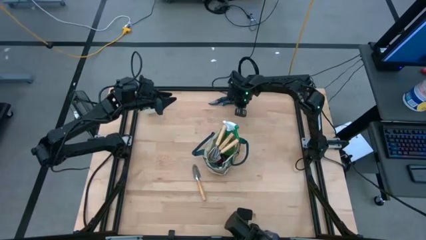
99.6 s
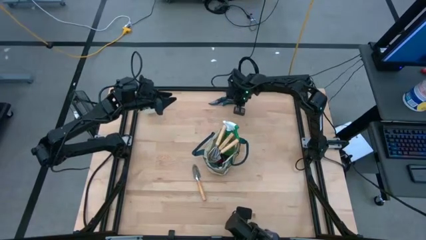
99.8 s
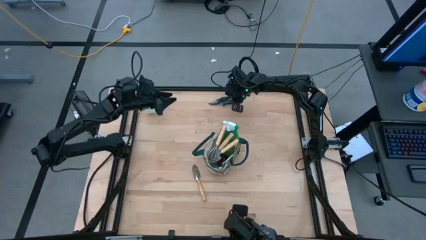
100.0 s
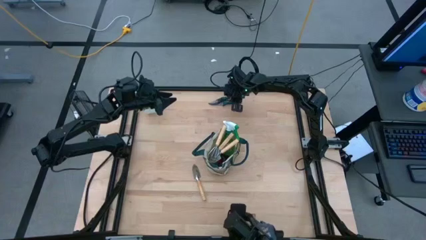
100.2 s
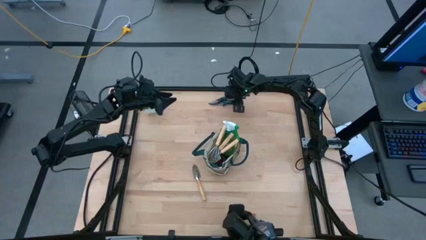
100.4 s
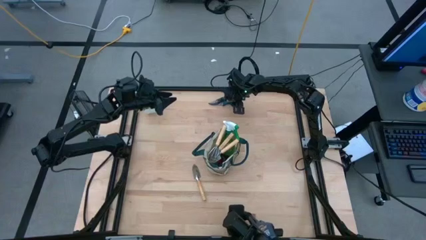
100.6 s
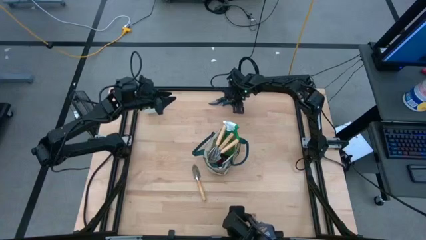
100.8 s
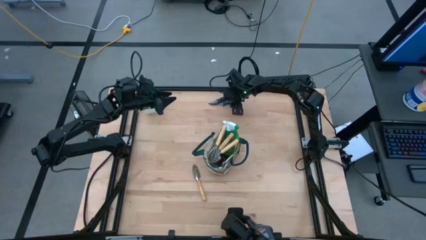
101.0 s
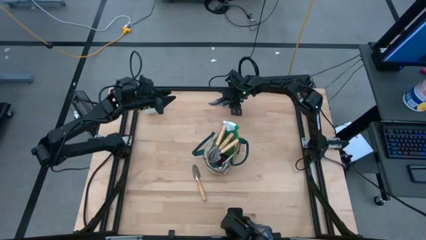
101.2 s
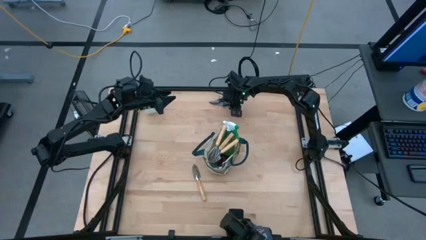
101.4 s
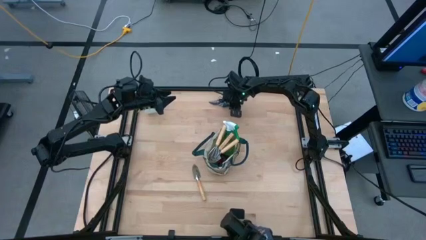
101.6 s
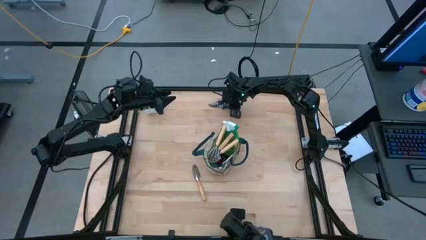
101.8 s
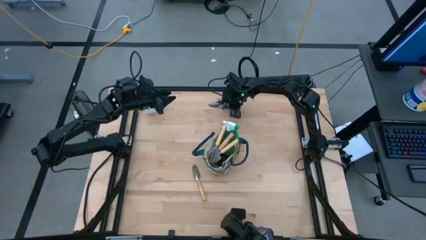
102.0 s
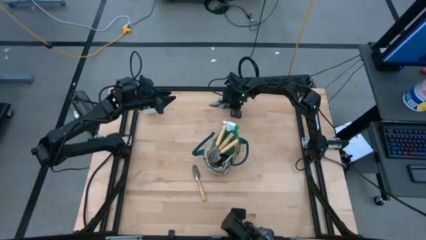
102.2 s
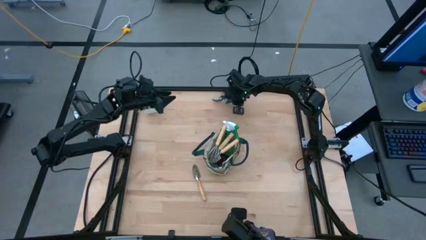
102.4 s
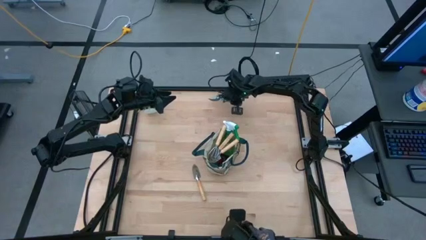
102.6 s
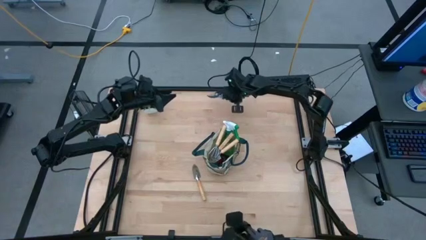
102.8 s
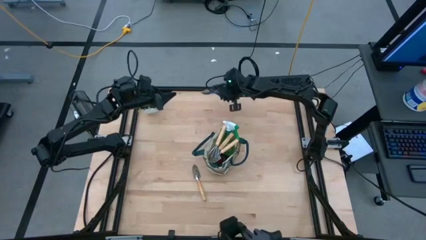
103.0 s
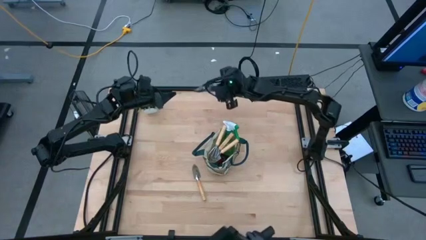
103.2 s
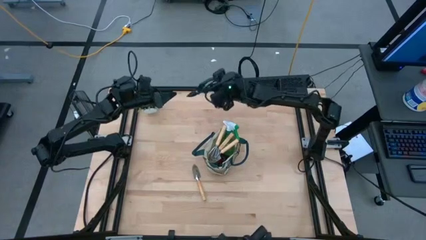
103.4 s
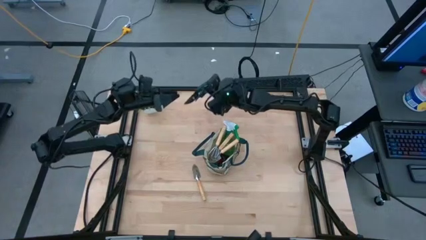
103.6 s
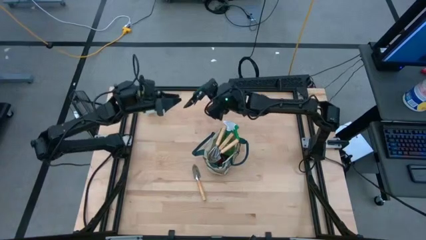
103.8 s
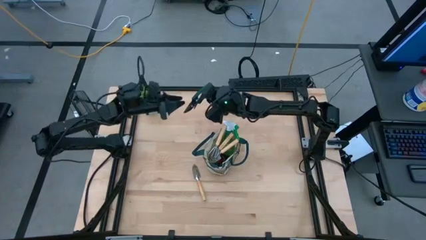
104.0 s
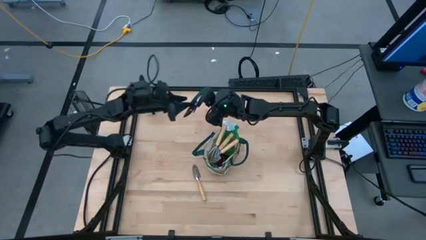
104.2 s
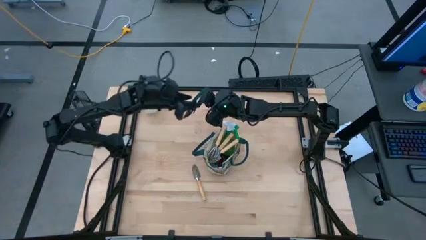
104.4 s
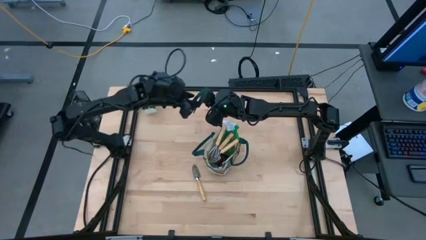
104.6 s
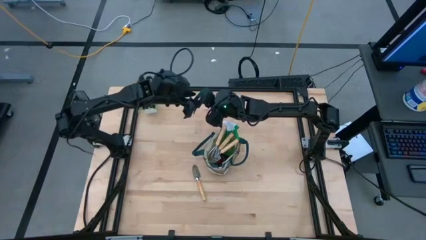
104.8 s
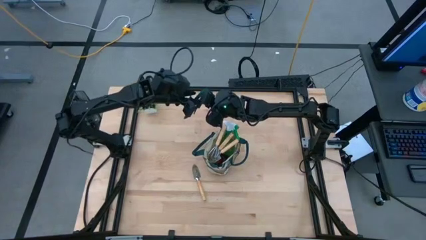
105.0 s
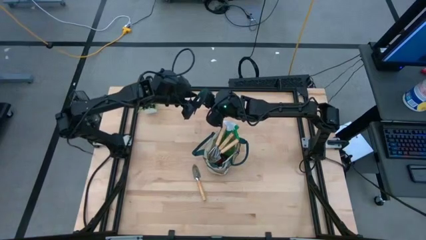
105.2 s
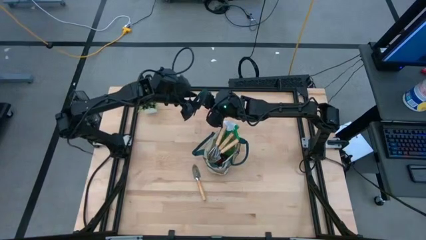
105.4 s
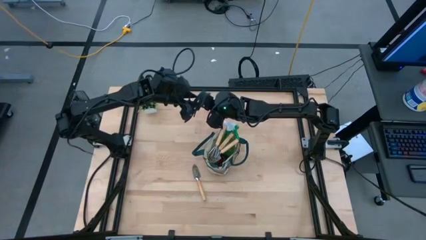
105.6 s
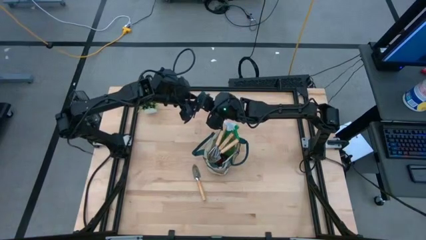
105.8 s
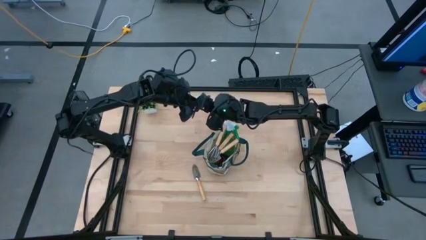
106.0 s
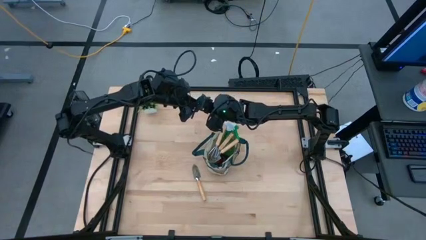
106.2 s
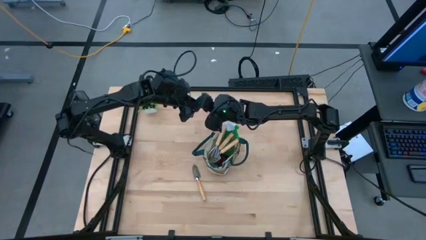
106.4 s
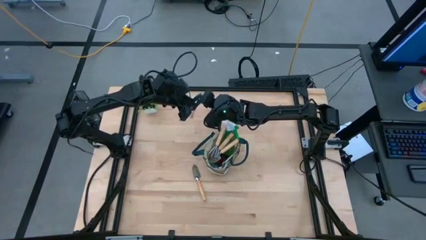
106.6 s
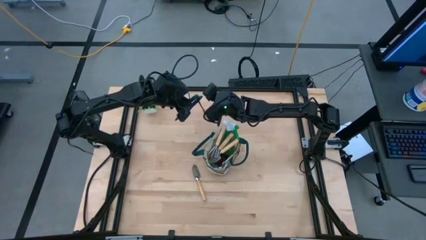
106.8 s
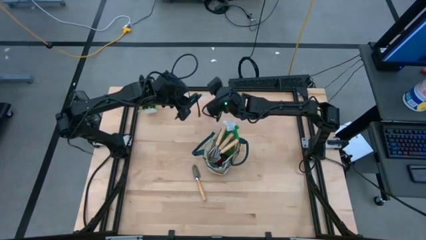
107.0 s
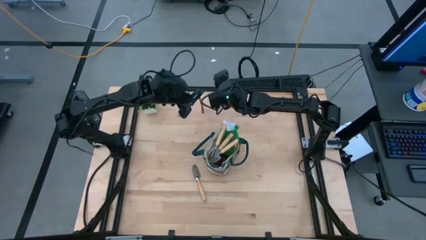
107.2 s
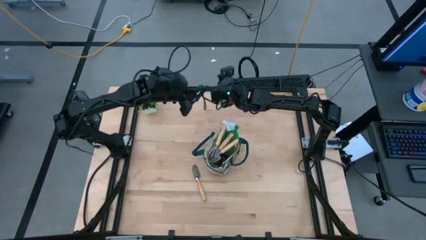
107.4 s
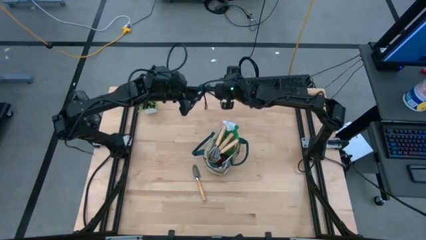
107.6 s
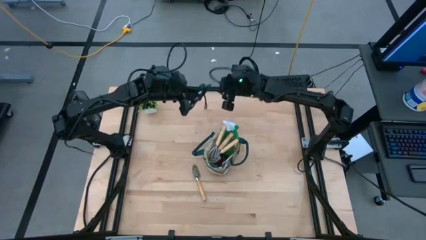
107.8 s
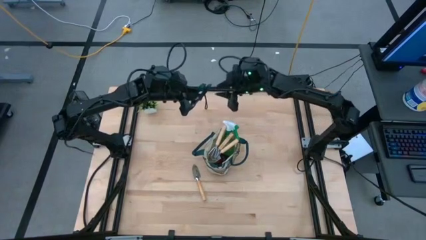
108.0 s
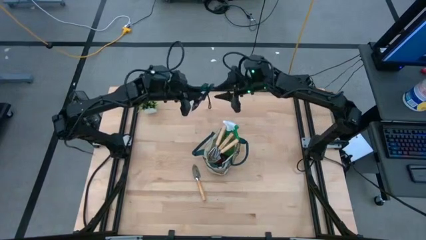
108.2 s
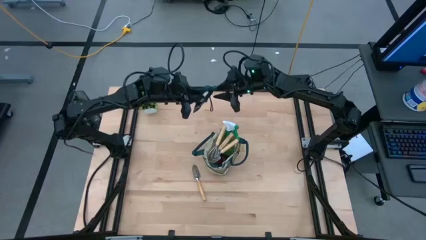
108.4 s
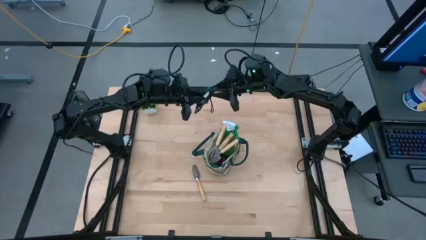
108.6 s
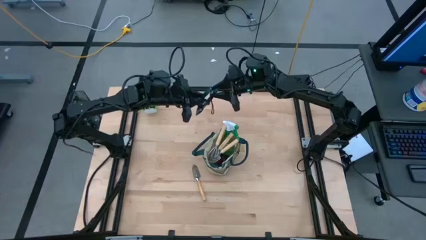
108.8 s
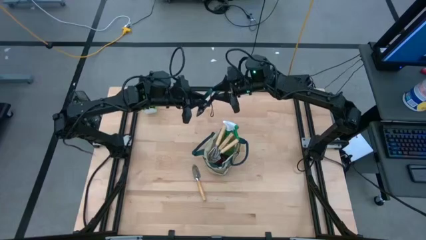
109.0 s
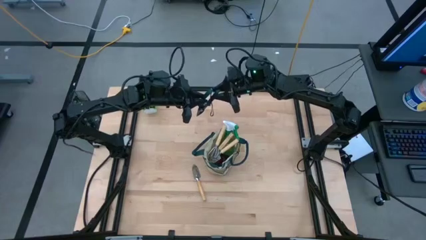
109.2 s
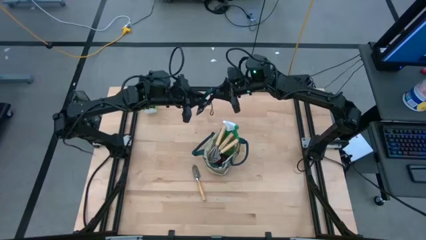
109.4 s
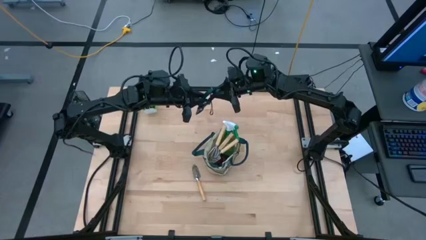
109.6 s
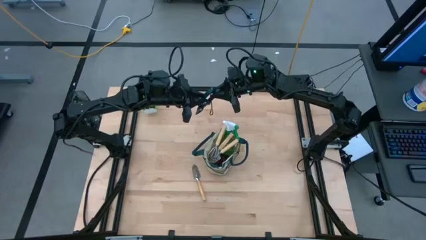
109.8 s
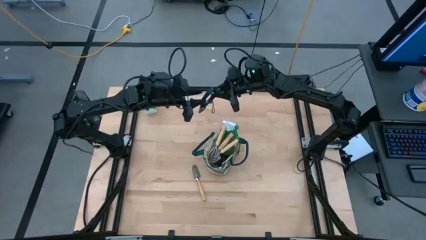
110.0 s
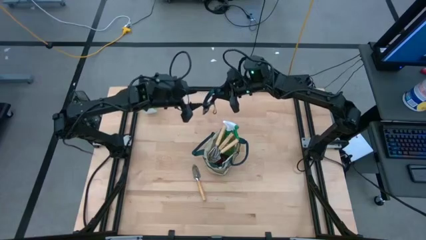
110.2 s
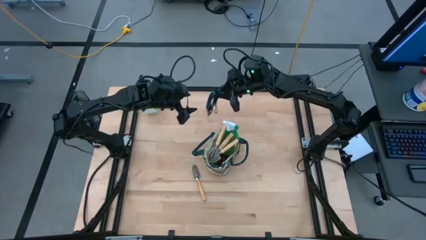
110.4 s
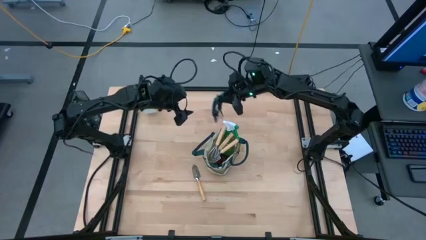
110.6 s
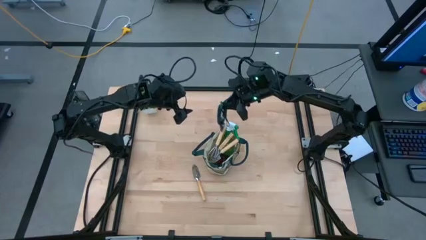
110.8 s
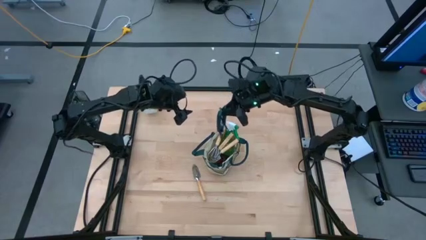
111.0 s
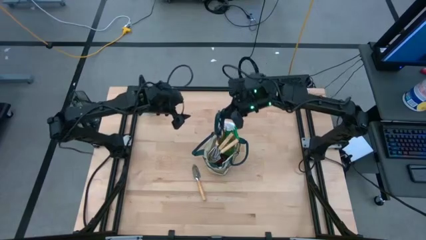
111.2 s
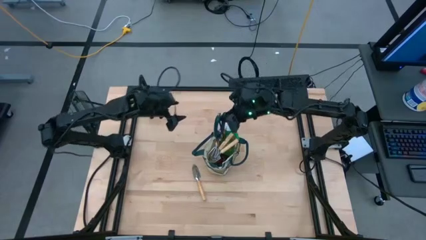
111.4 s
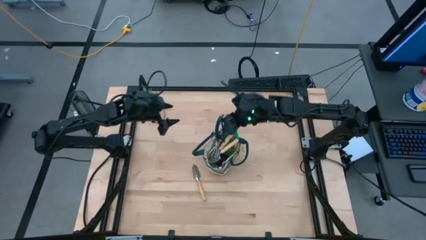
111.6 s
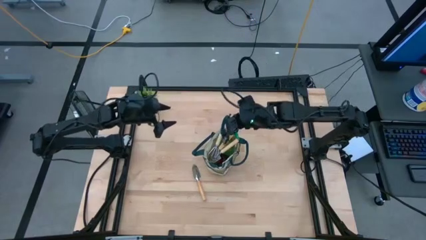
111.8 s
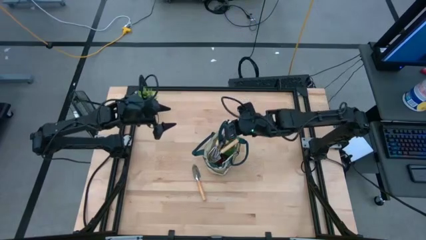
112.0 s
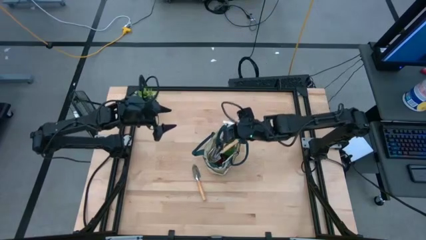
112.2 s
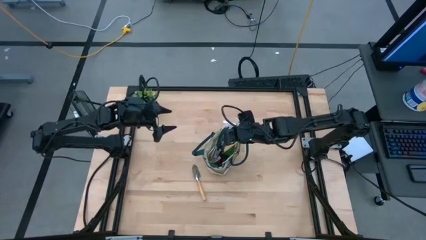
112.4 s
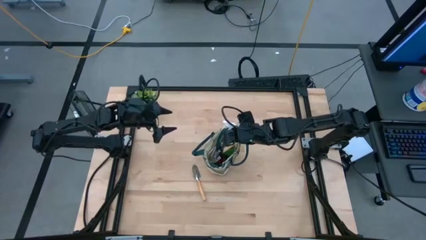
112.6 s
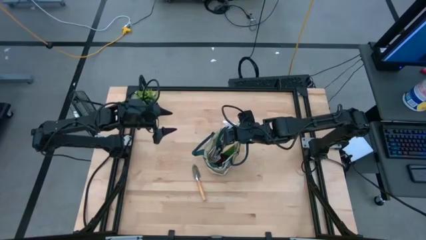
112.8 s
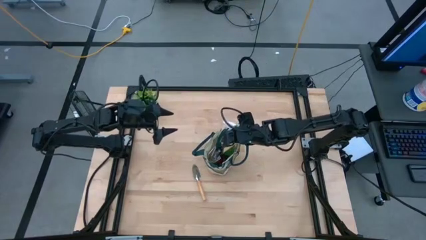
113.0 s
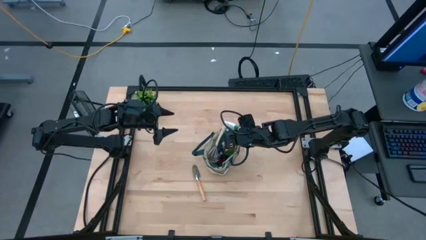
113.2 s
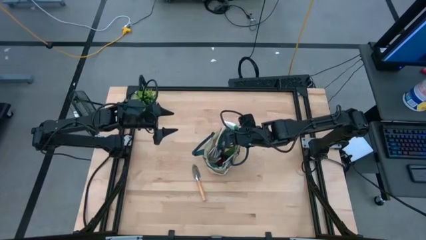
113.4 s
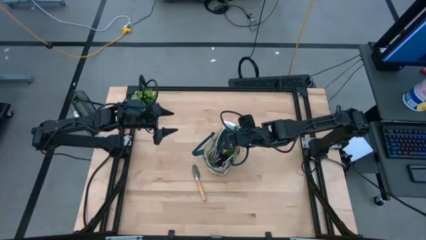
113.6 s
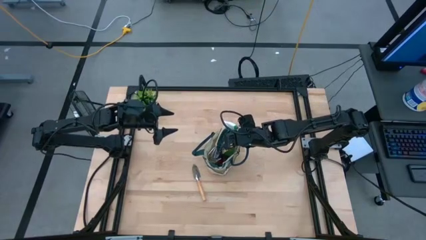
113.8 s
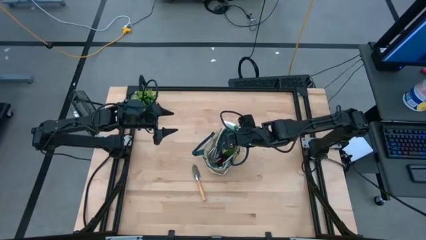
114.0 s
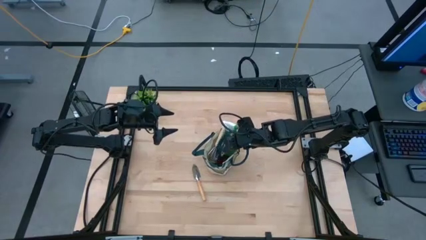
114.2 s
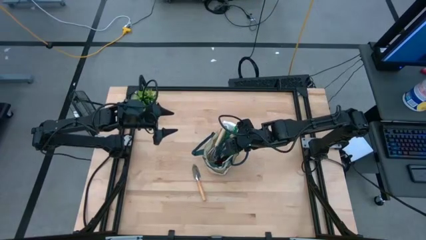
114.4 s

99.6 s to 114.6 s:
Task: Pick & Place Garden tools in Gardening bag
Put the green shear scissors into the gardening bag

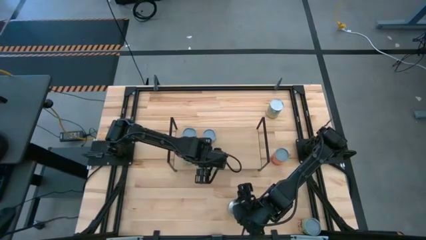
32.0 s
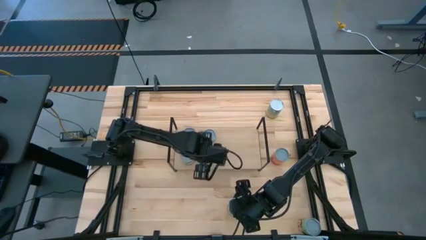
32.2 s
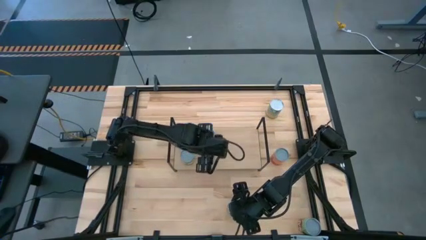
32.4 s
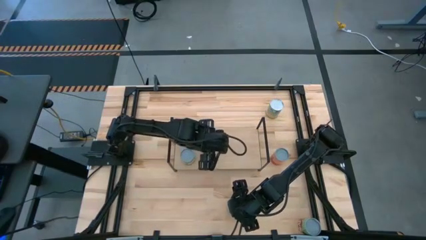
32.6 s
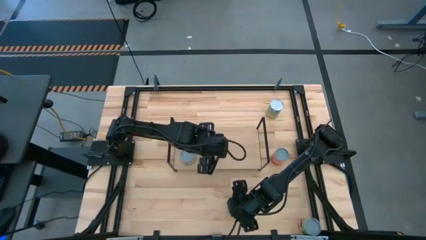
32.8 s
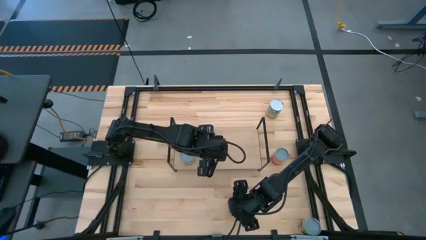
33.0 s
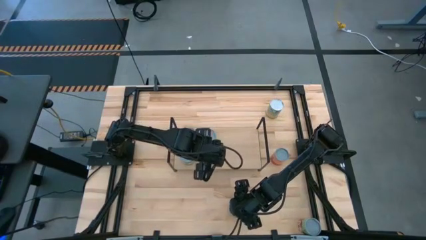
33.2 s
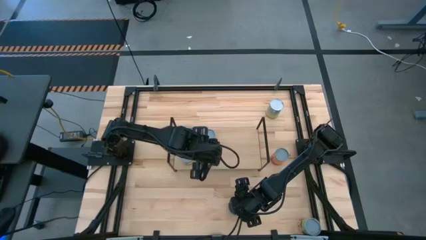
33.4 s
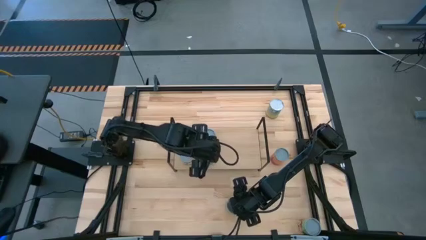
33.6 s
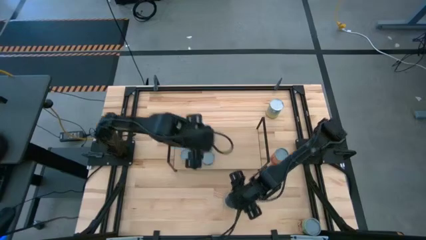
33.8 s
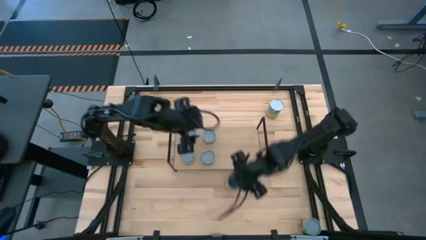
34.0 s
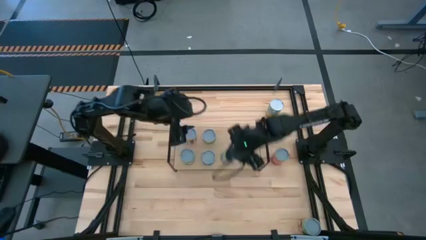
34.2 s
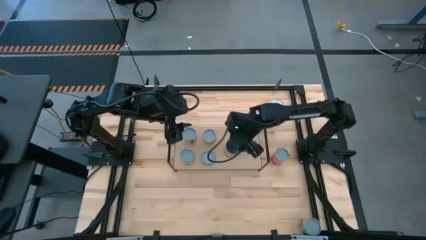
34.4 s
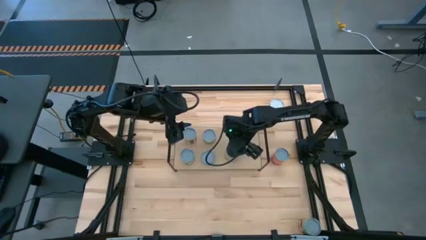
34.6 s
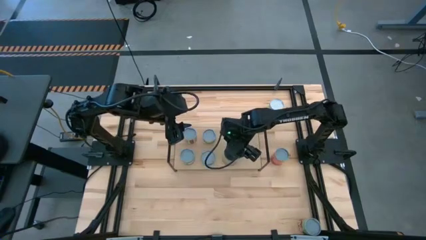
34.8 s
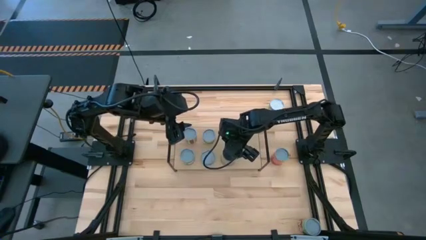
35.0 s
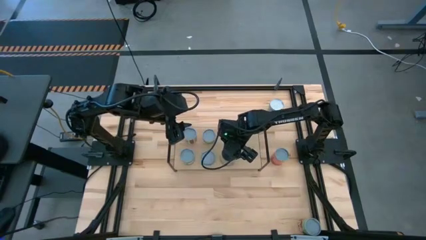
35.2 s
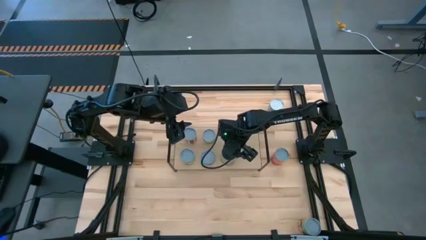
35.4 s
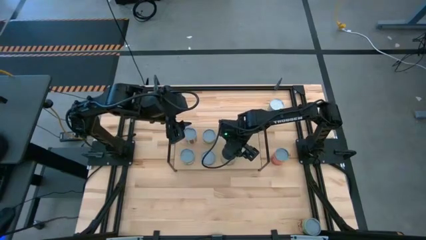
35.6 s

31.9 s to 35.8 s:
Task: Pick and place cans onto a shelf
Put the canned oranges on the shelf
